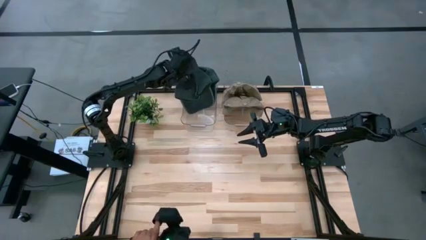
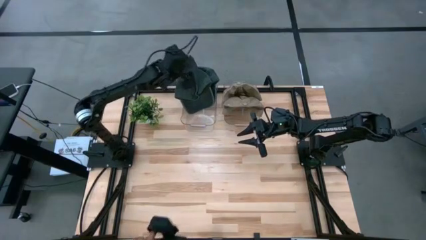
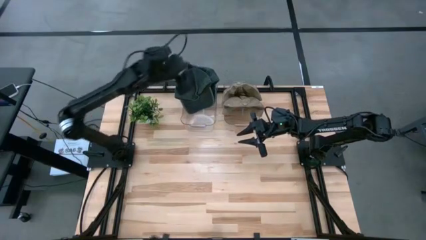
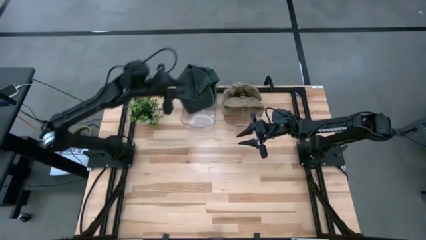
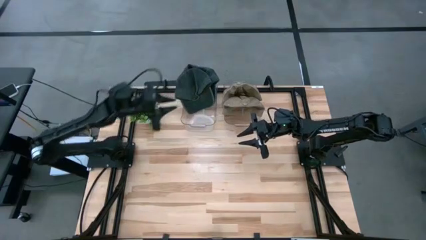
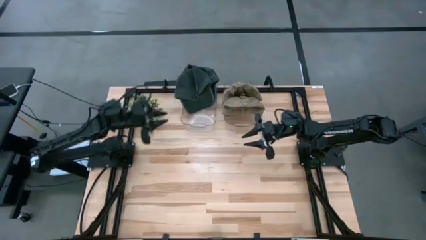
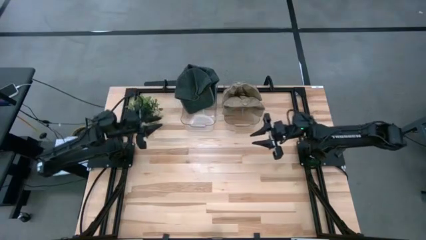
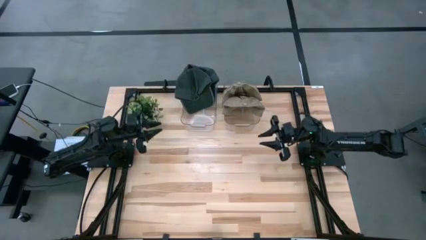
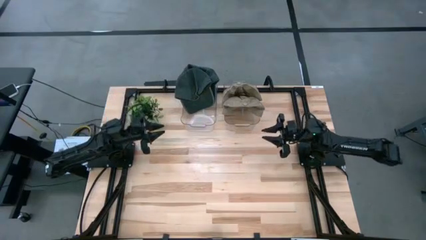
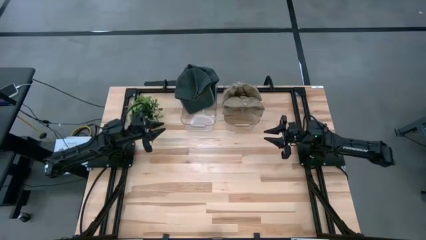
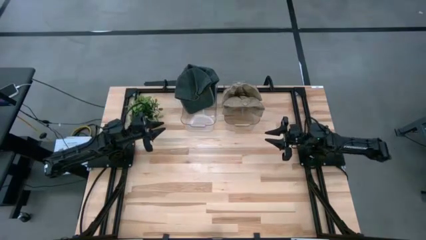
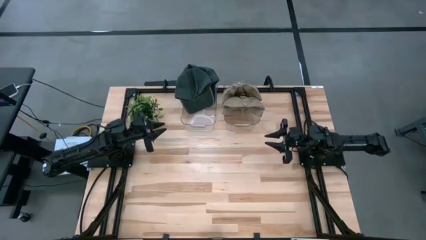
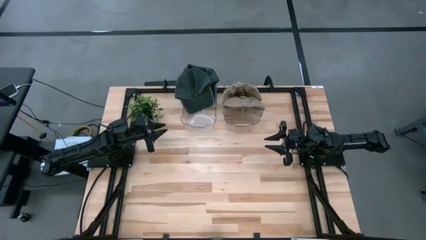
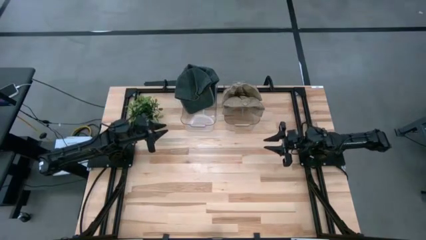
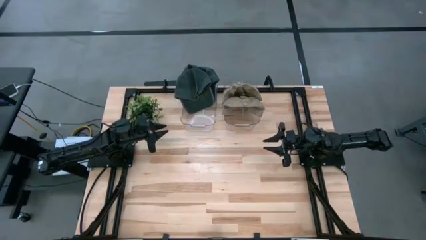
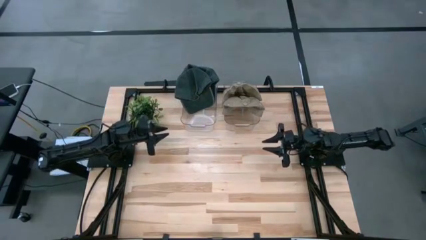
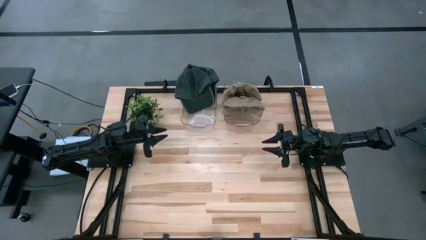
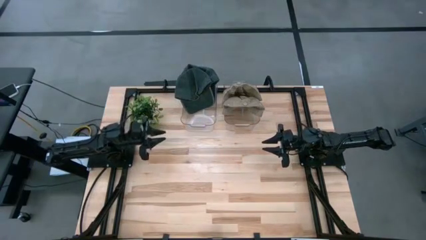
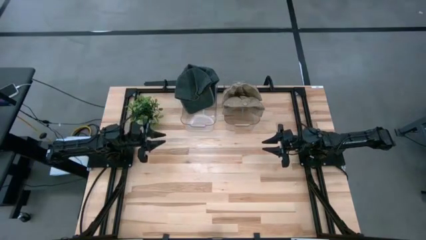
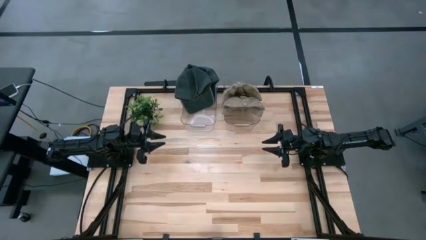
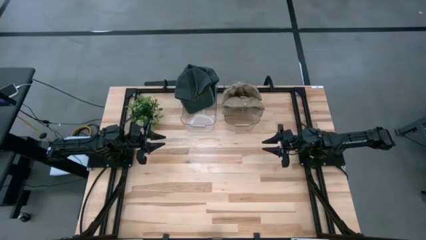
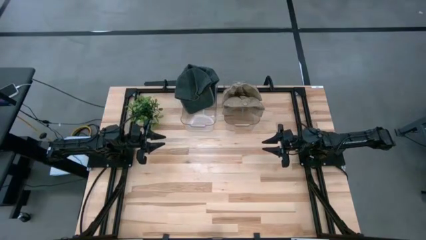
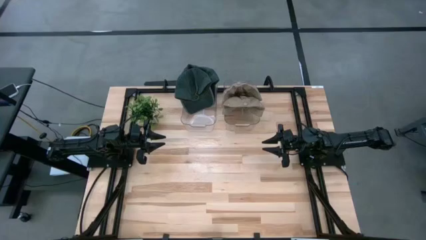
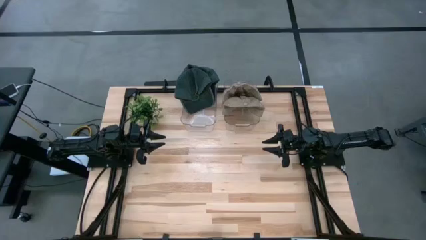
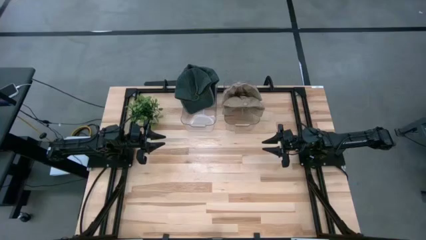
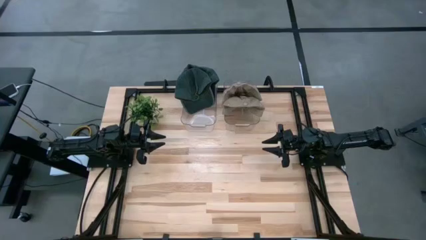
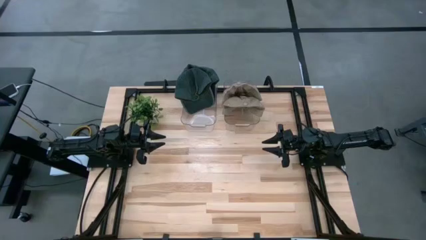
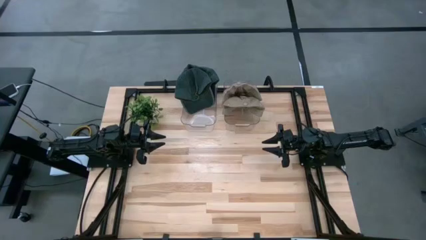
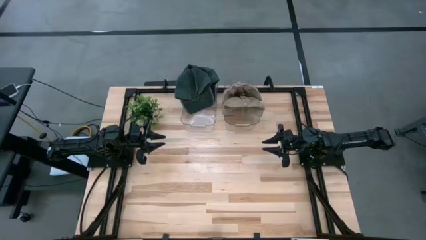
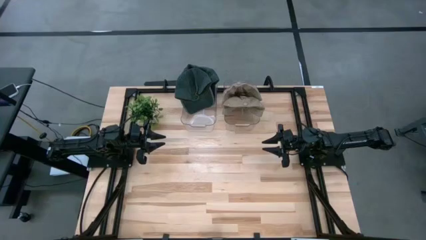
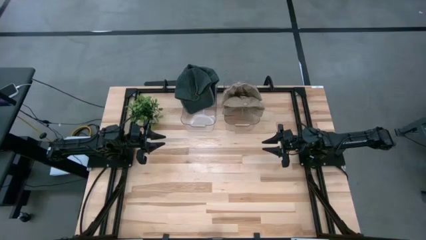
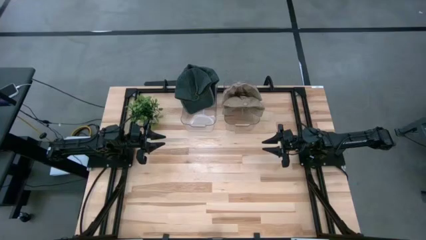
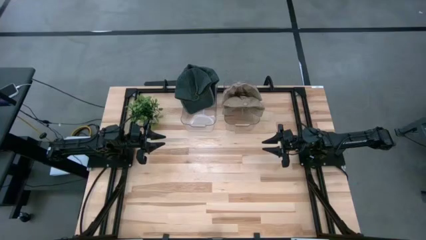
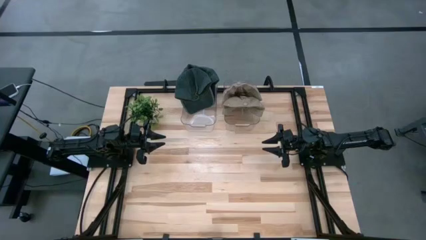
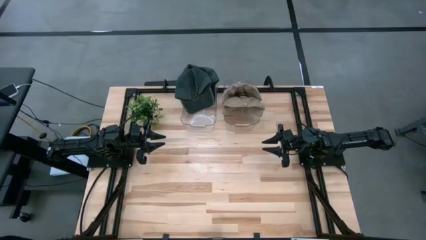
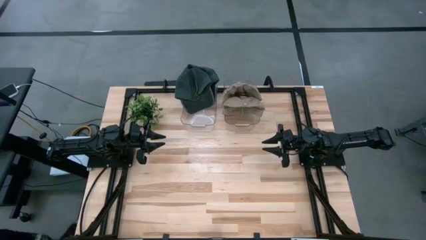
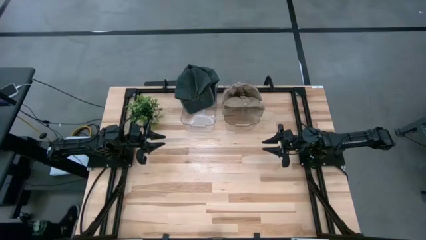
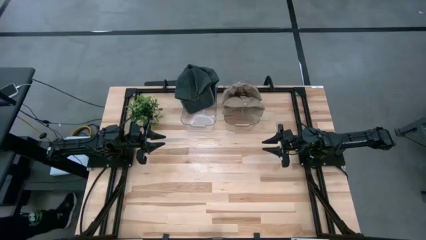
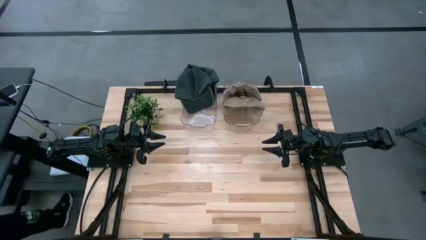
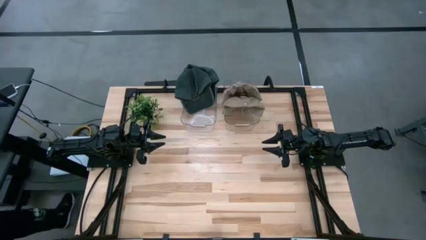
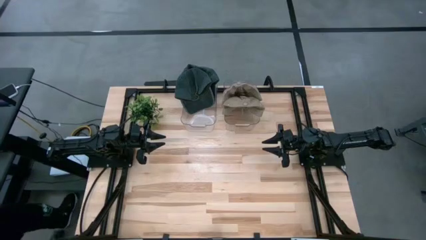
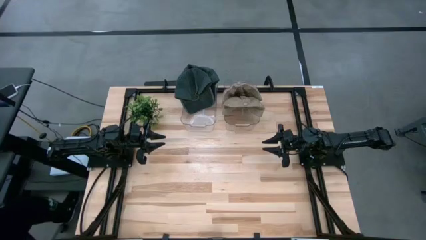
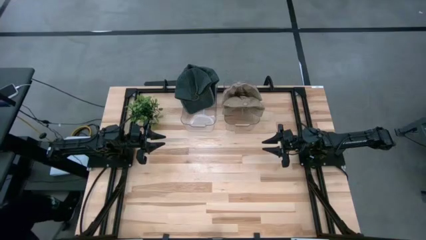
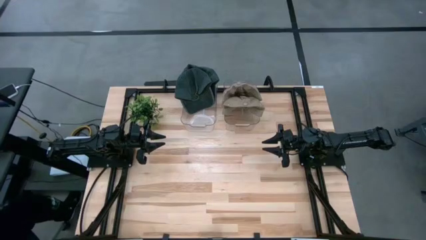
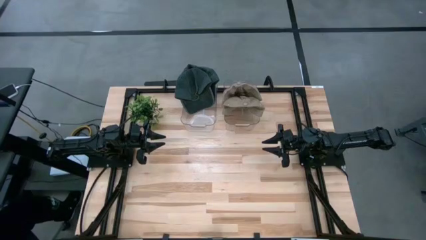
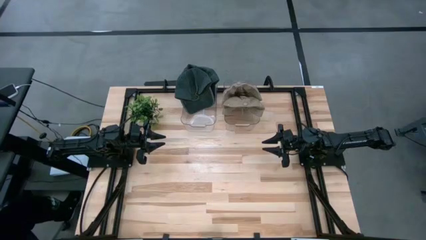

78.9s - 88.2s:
Task: Pick & Place hat
Return to Home Position

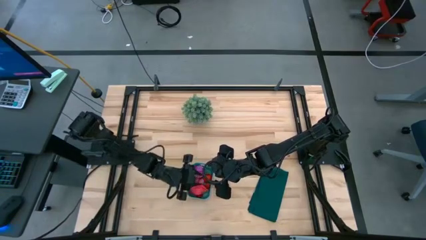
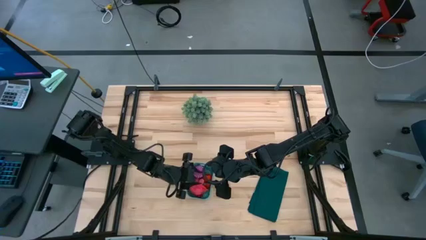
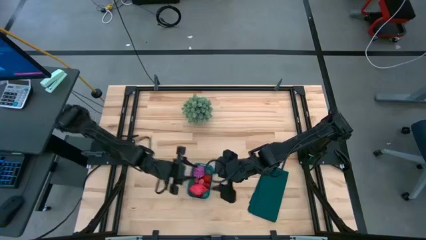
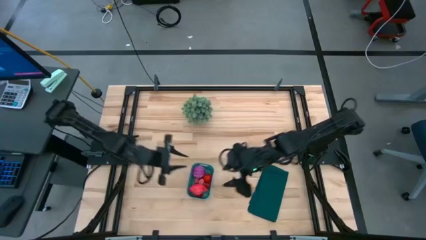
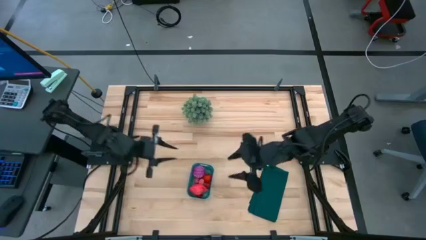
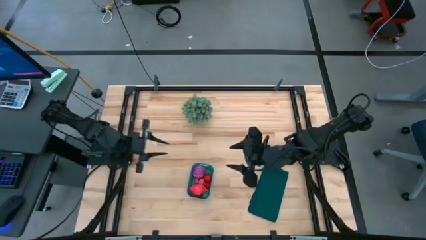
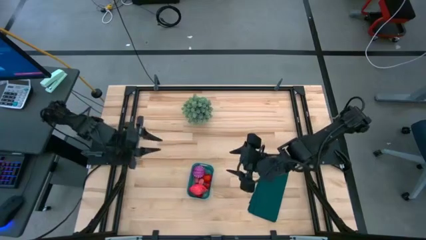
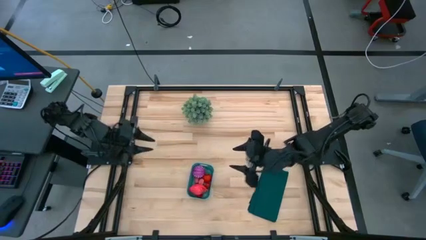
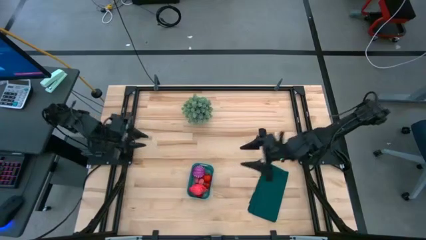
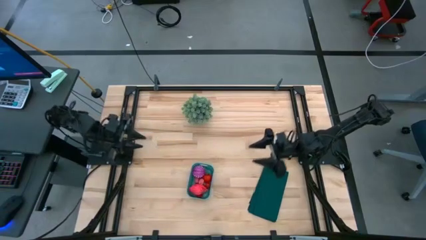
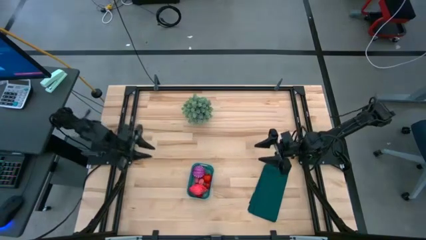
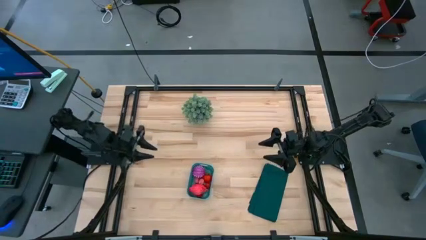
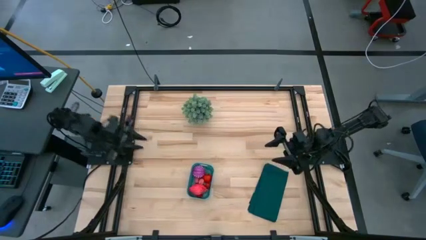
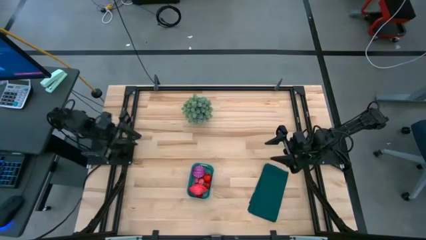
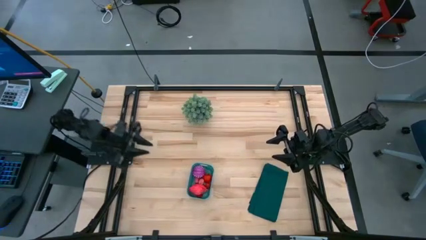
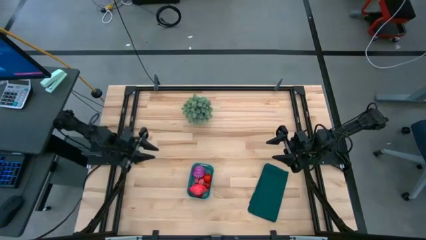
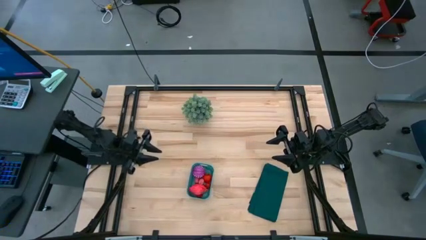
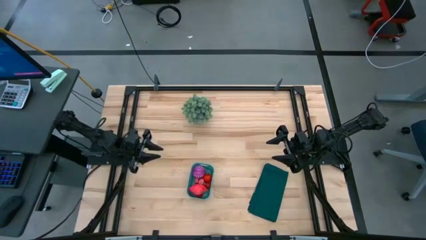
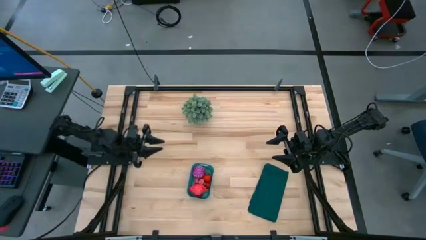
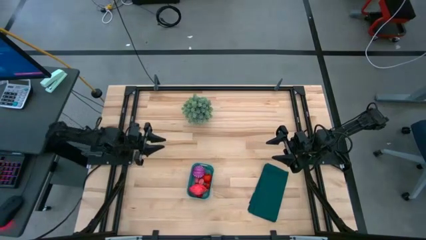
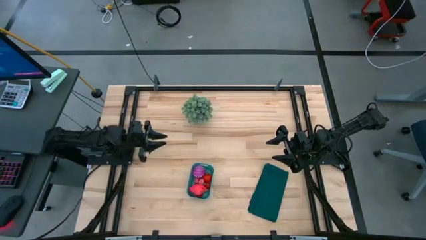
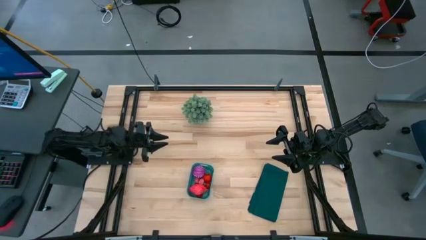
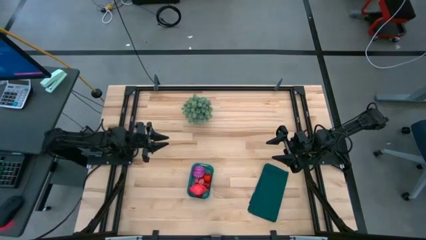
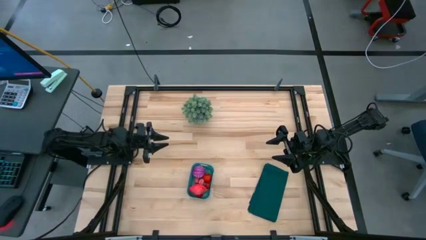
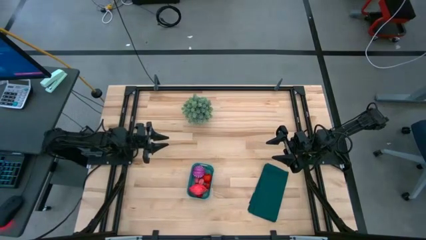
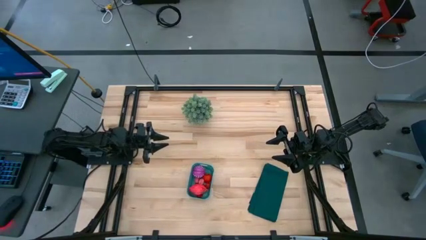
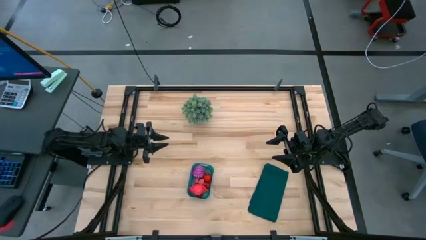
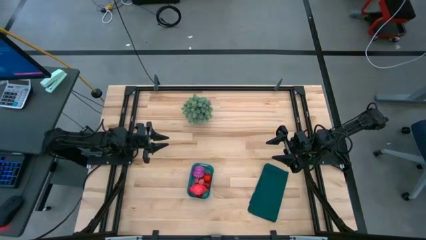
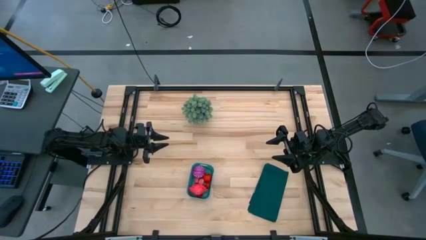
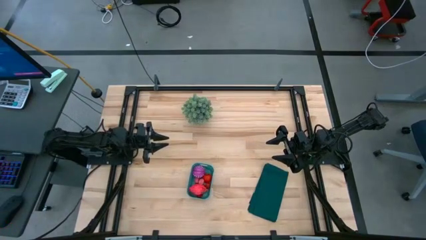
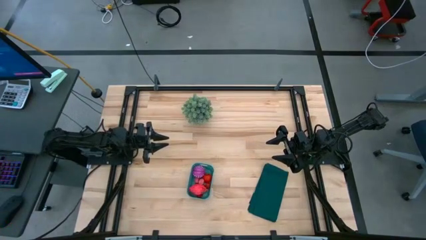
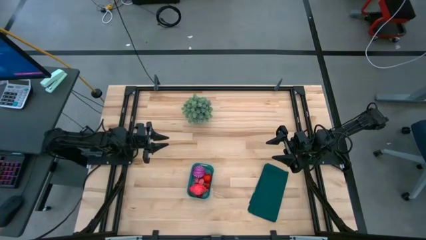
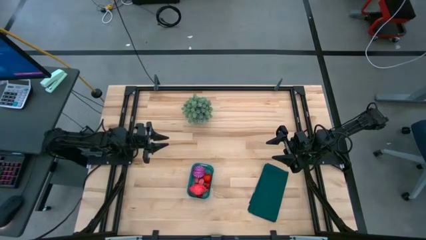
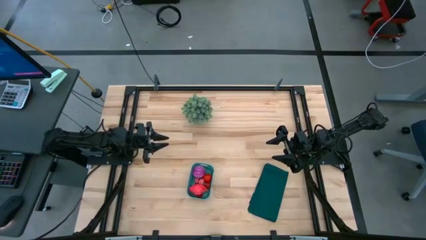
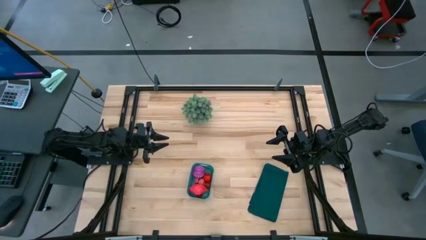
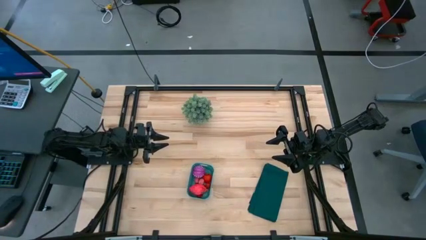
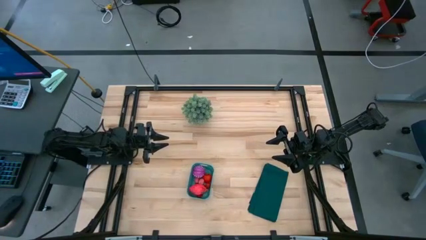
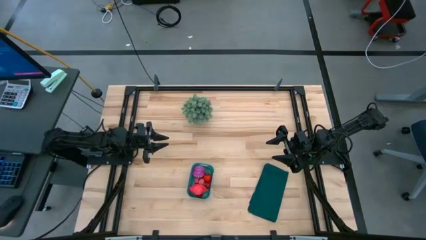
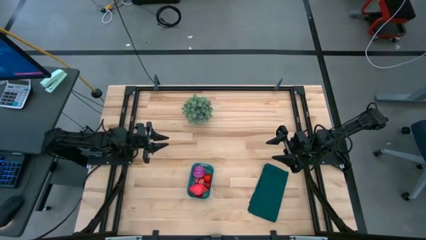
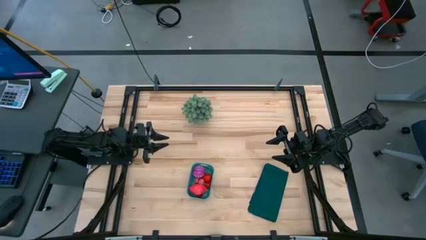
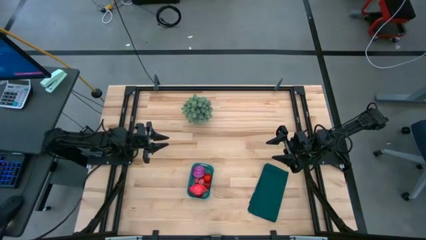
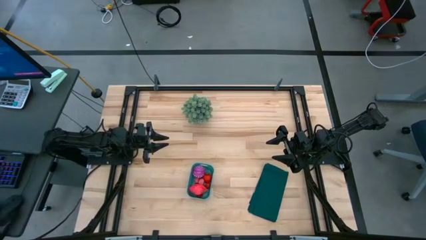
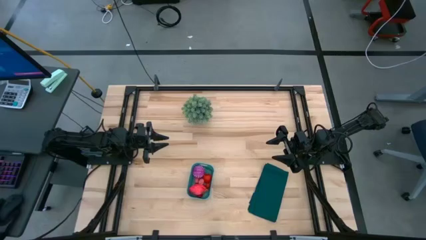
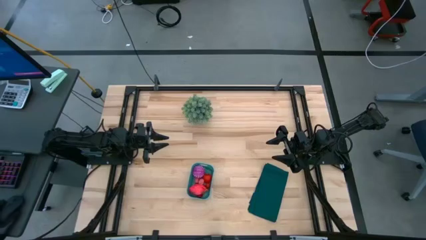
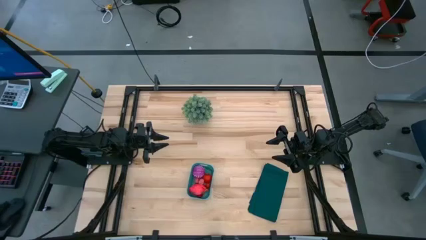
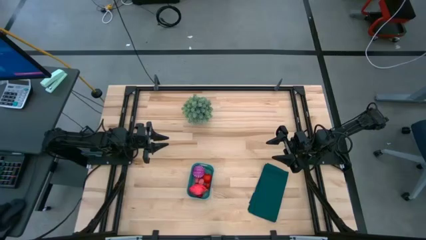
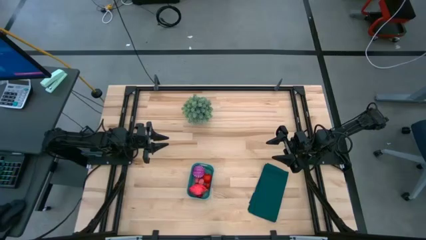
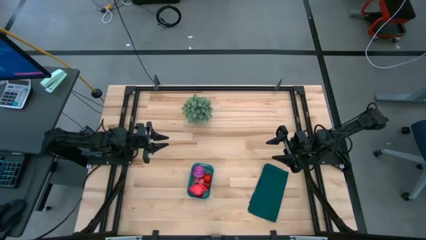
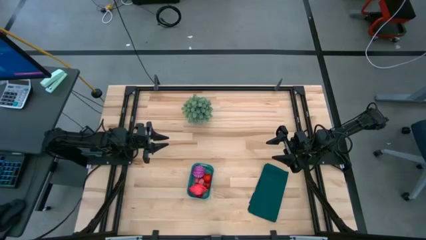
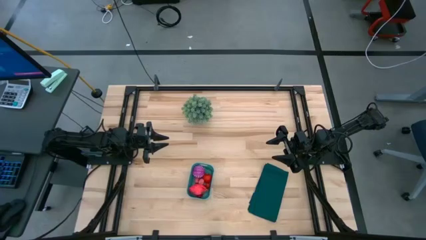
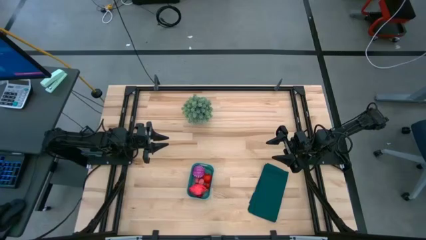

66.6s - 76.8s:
Task: Pick and placing Produce into tupperware
Return to Home Position
